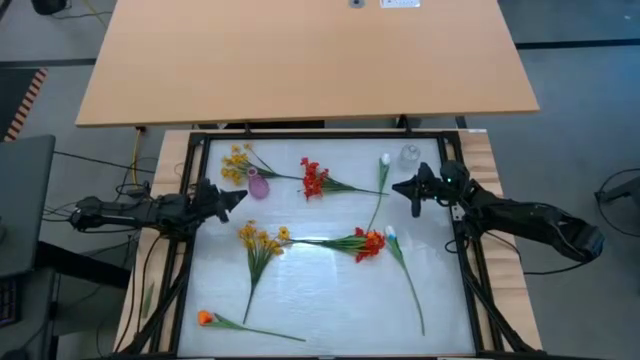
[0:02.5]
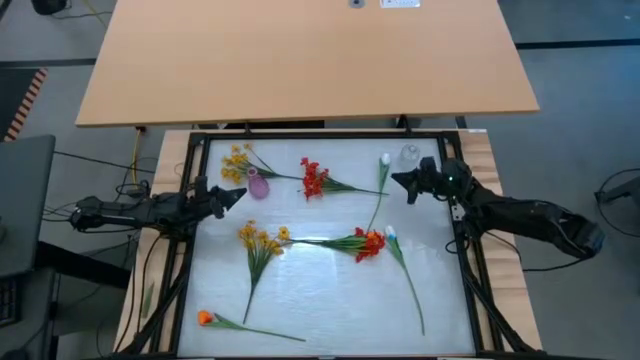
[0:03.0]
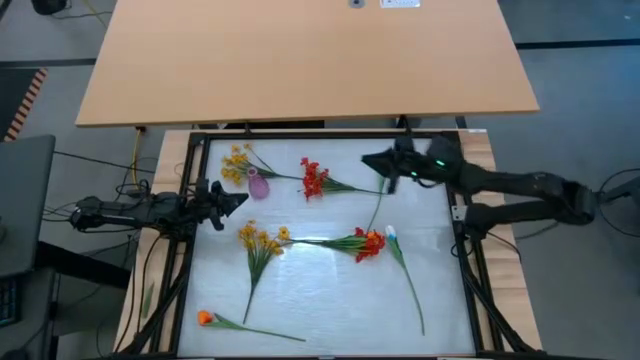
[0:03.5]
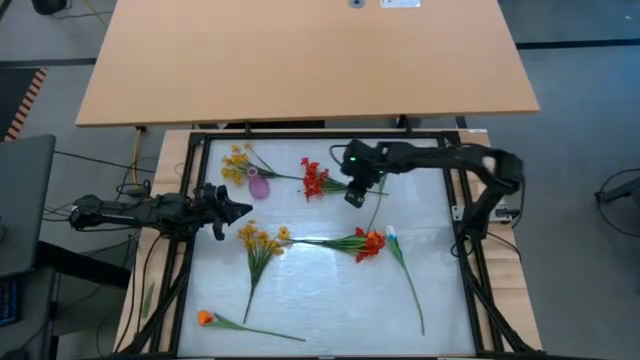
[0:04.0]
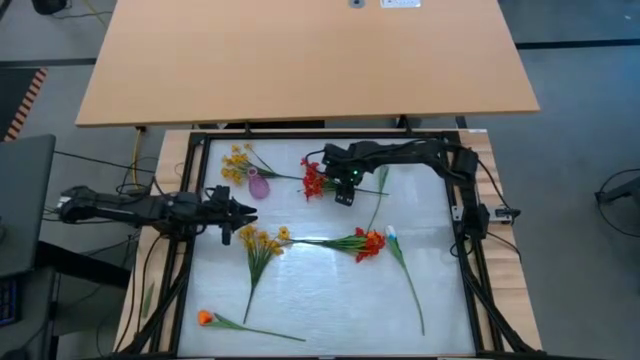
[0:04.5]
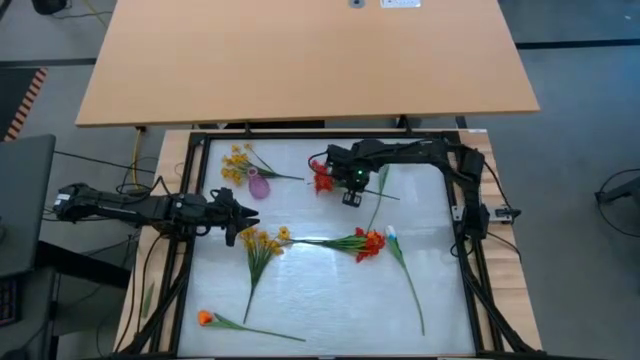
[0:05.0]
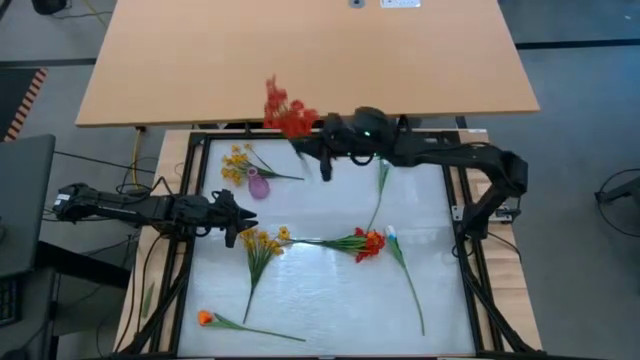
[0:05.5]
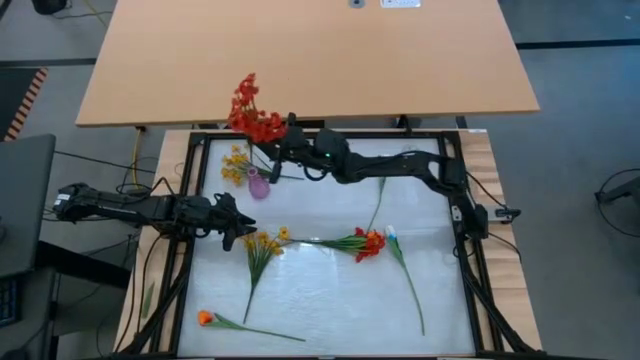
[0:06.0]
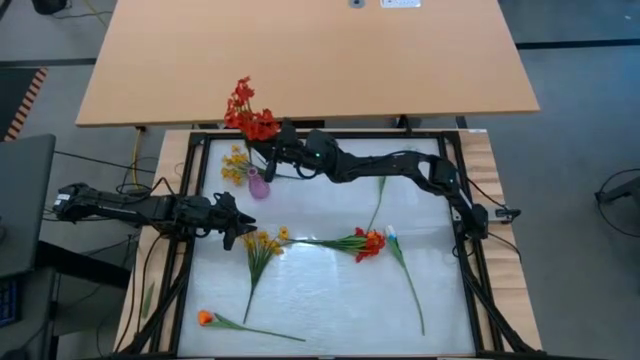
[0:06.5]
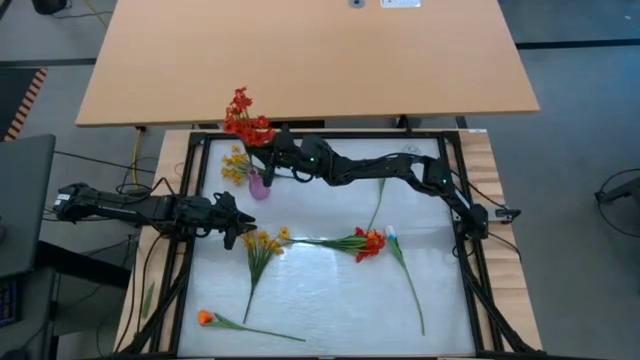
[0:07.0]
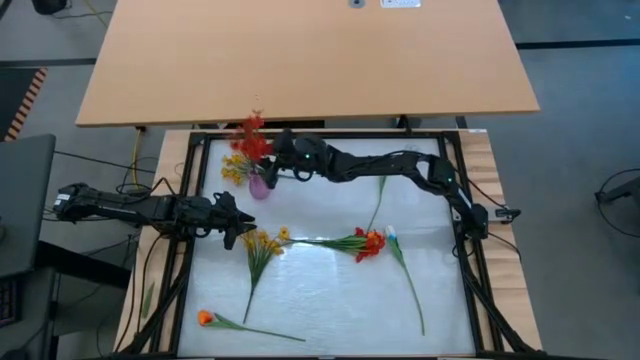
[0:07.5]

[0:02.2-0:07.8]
Task: Sort flowers into vase by color
Put the top red flowers into the purple vase

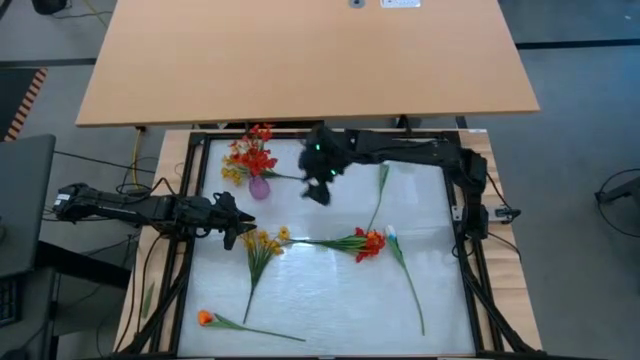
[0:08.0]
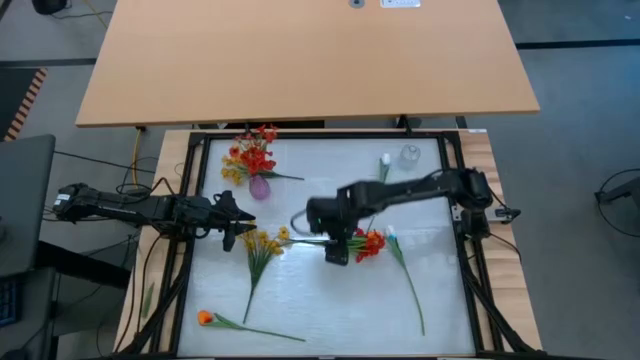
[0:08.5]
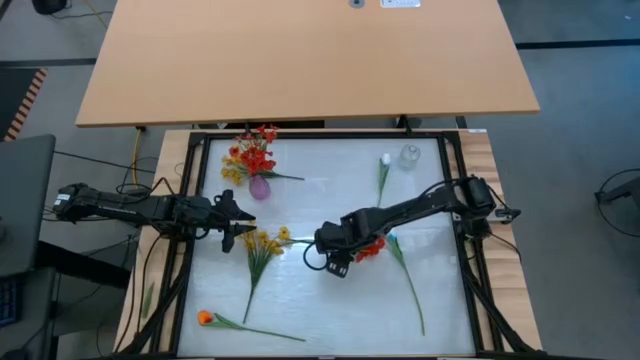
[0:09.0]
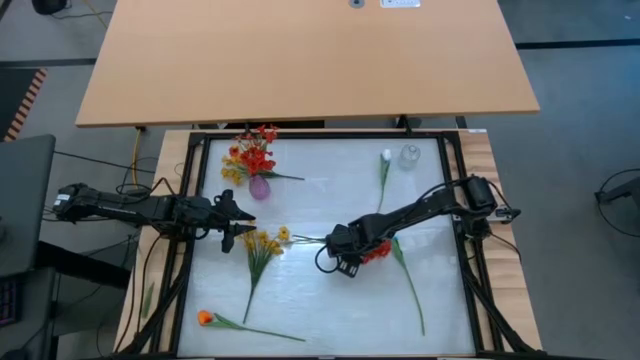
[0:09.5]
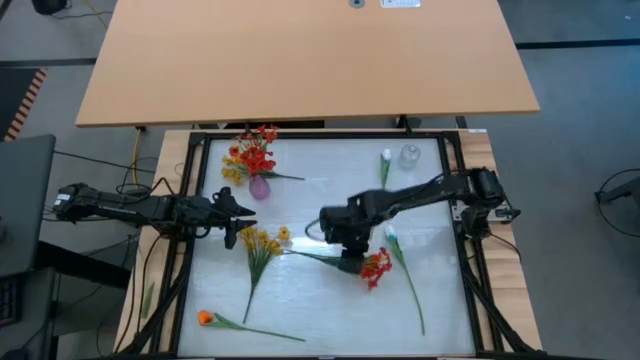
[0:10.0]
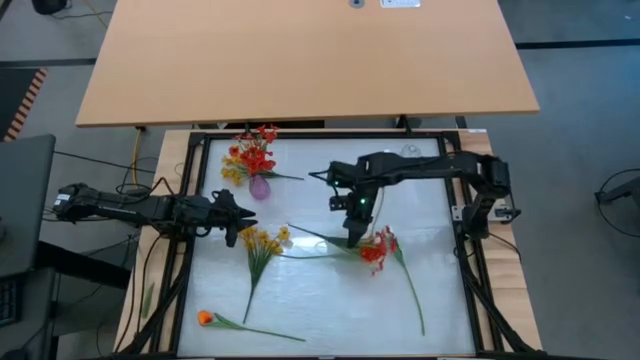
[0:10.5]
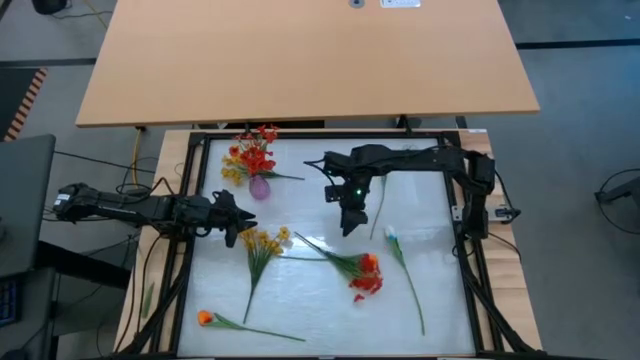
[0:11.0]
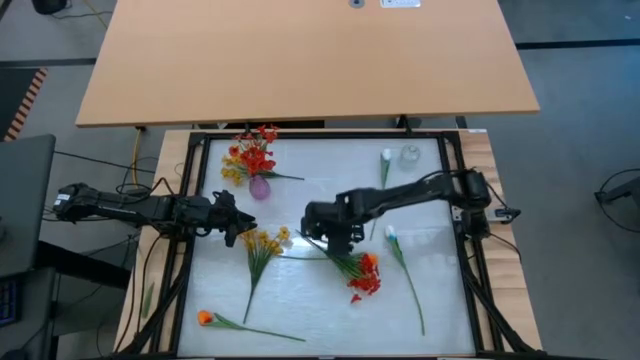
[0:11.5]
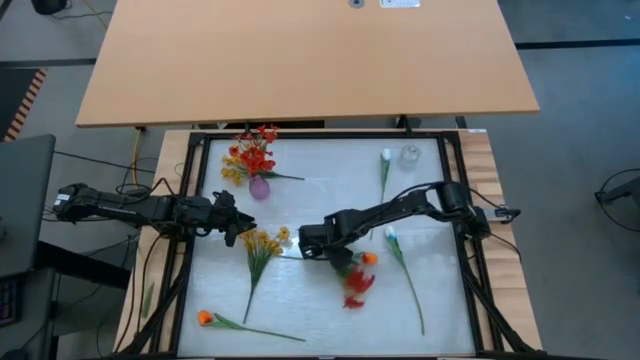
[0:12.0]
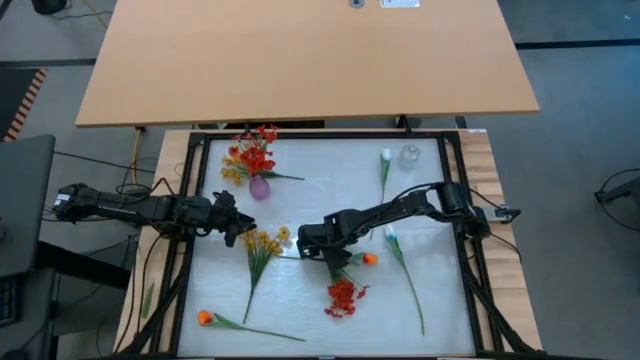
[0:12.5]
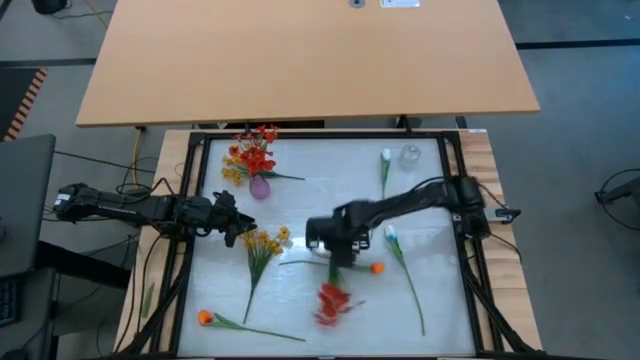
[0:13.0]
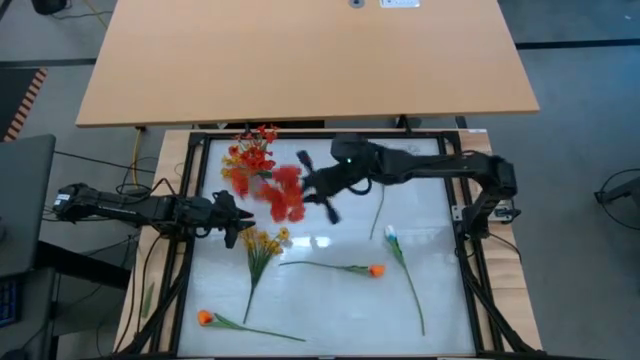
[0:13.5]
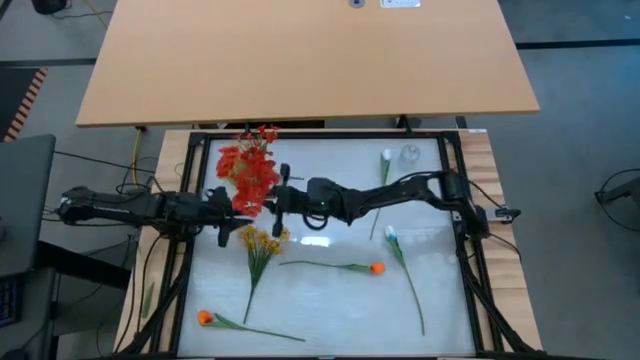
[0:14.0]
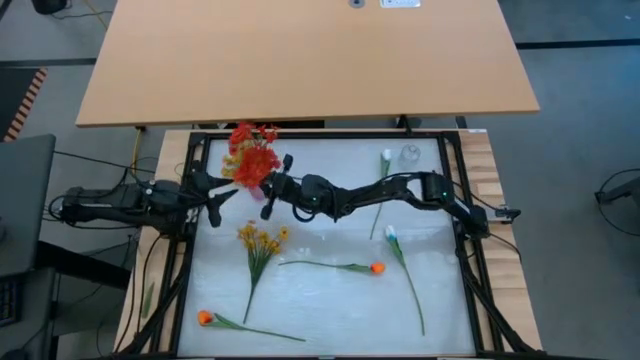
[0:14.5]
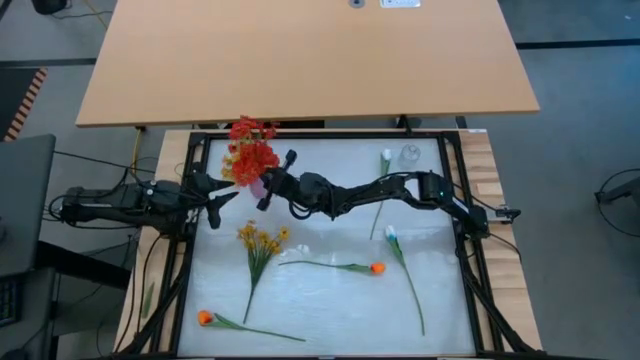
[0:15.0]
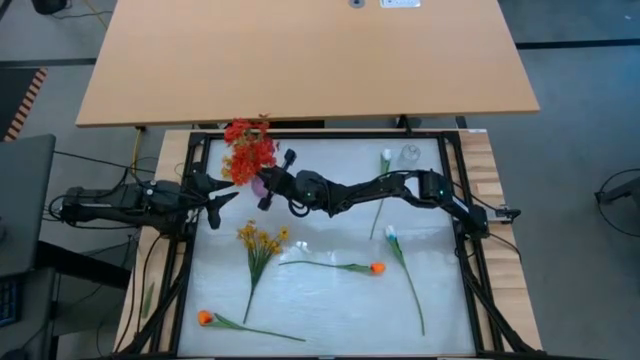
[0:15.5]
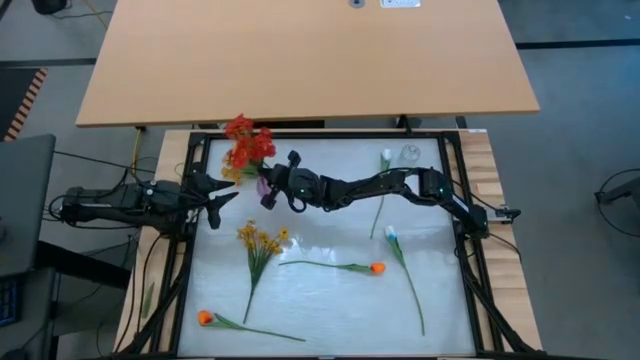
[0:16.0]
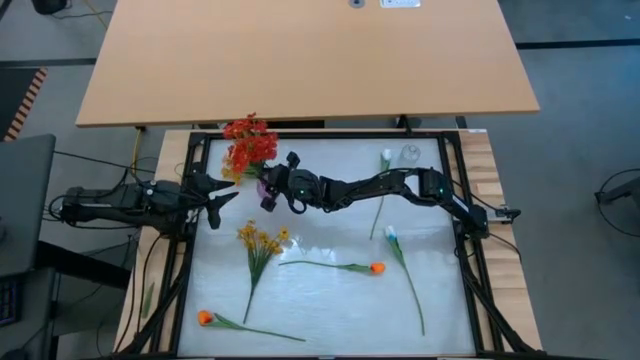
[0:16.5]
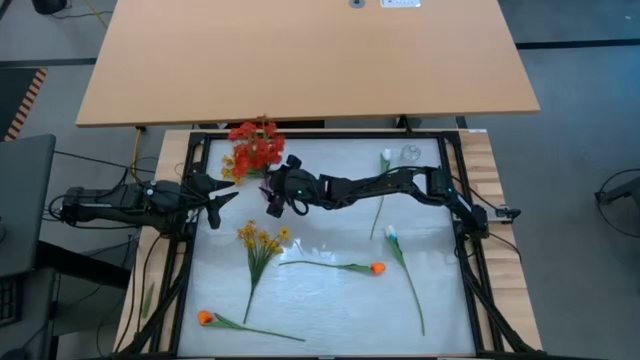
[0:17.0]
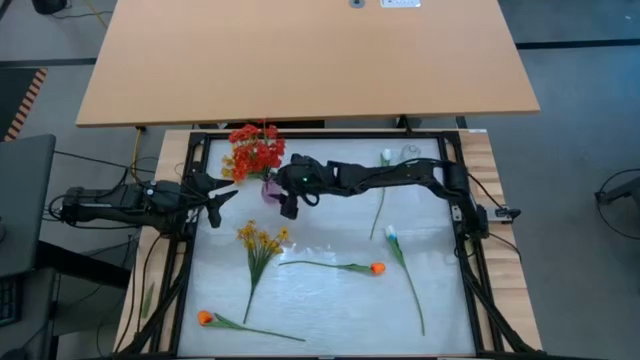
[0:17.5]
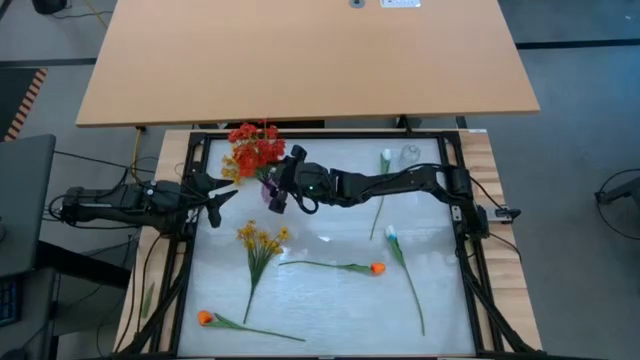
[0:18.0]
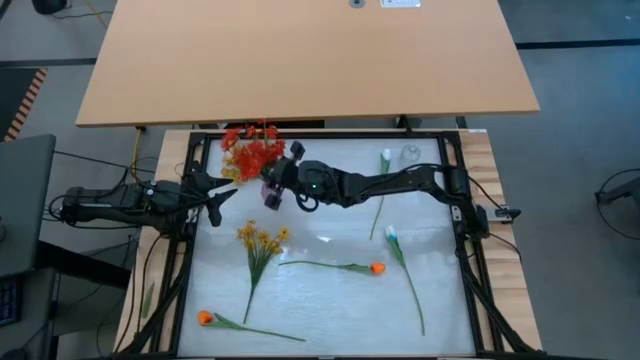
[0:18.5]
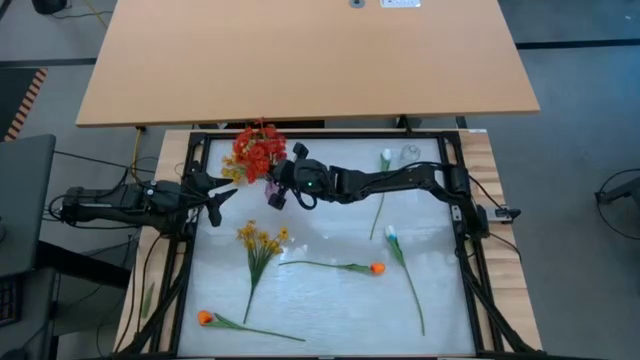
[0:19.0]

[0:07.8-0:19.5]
Put the red flowers into the purple vase

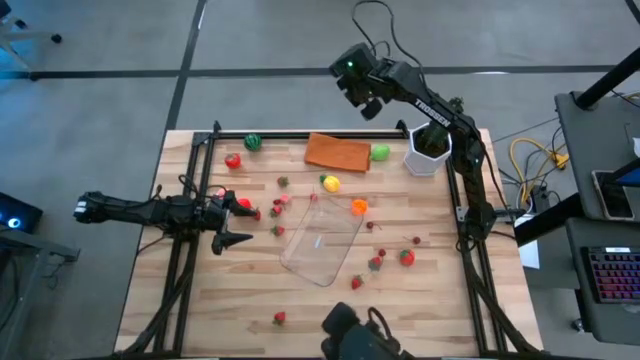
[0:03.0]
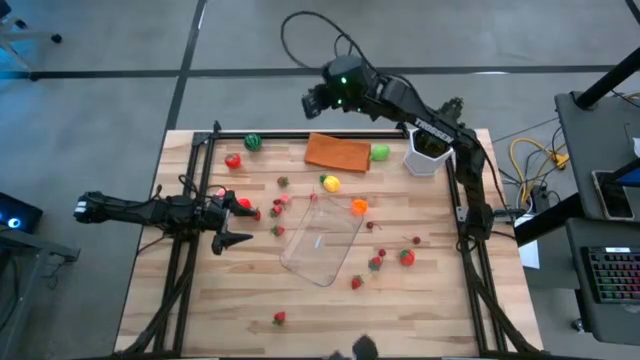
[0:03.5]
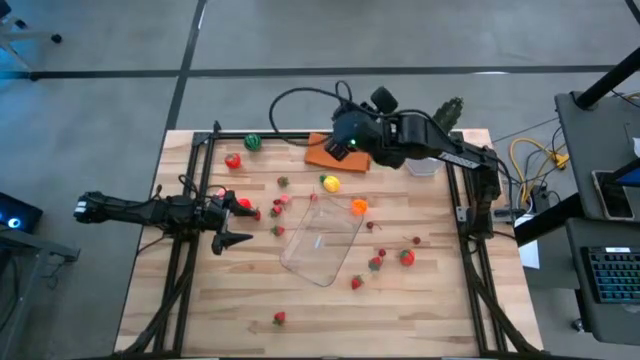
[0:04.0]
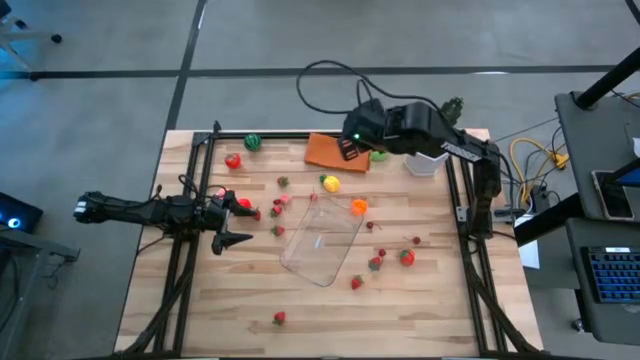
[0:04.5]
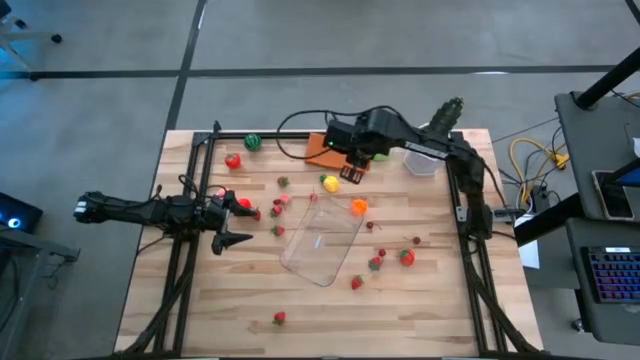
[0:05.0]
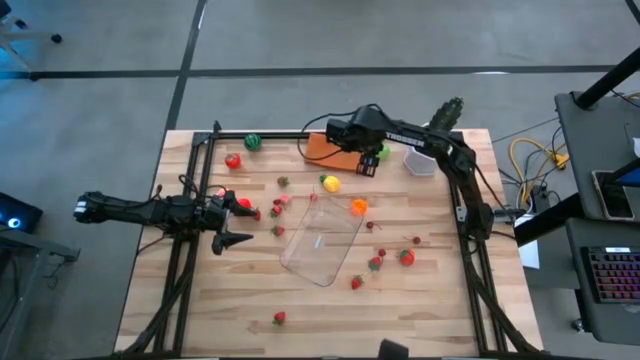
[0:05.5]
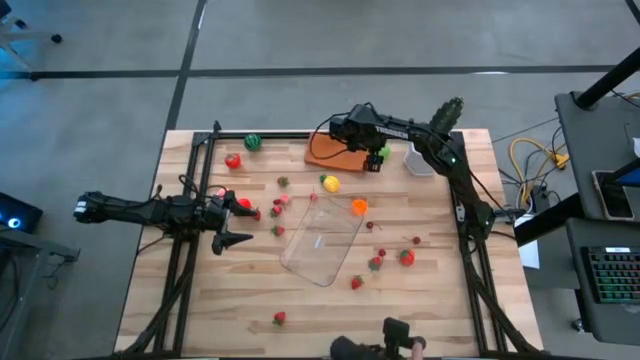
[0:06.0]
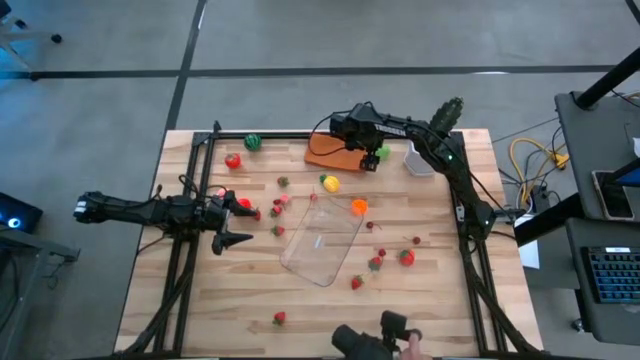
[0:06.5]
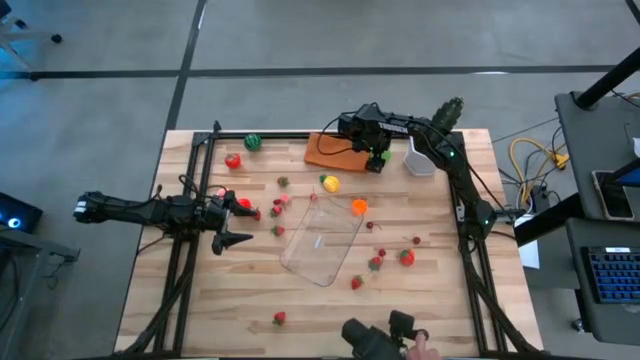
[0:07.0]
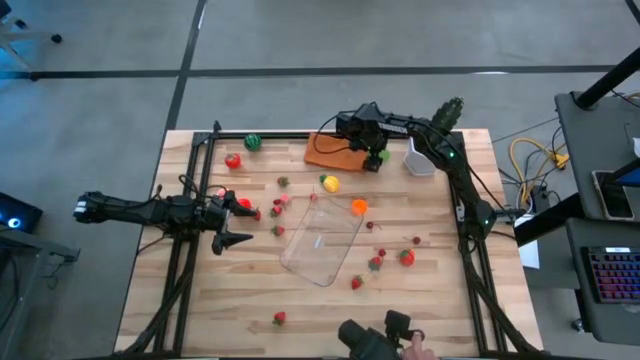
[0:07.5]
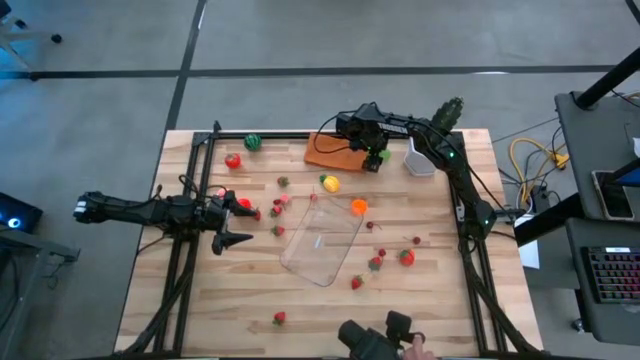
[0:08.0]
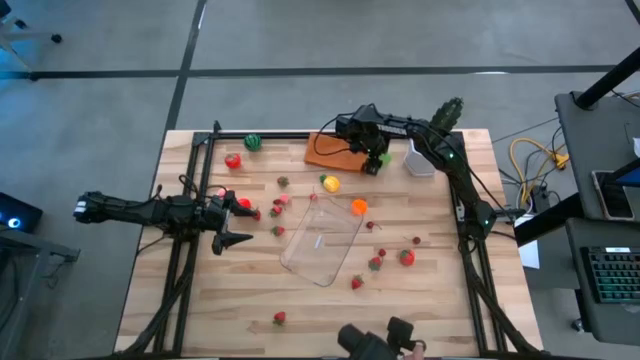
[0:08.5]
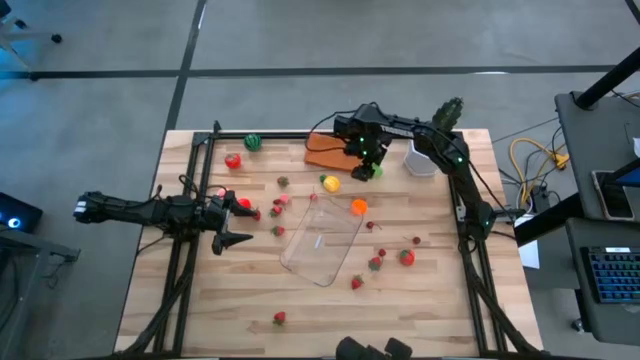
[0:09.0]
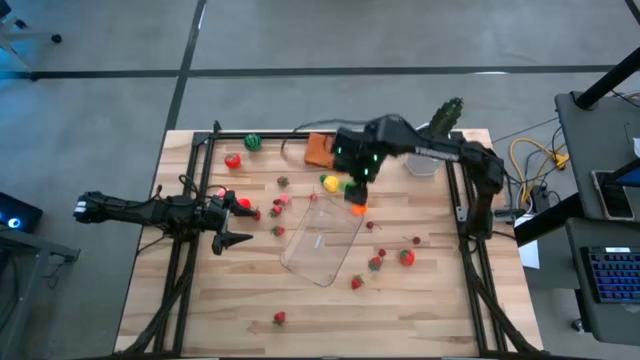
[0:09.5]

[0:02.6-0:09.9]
Task: Pick and placing Produce into tupperware
Put the melon into the transparent bin
